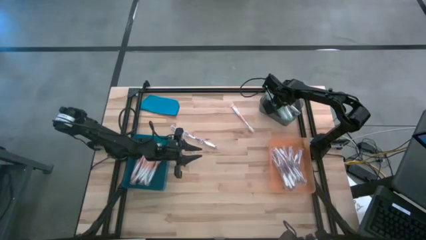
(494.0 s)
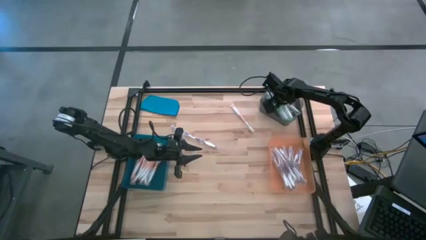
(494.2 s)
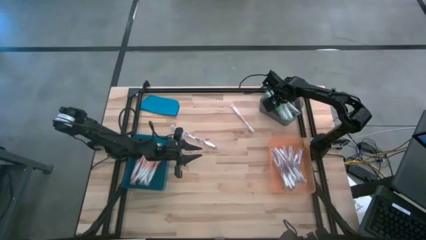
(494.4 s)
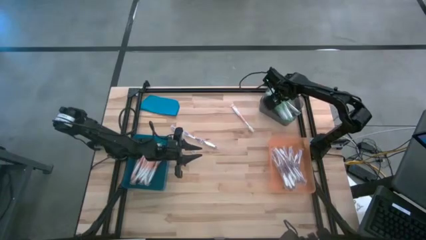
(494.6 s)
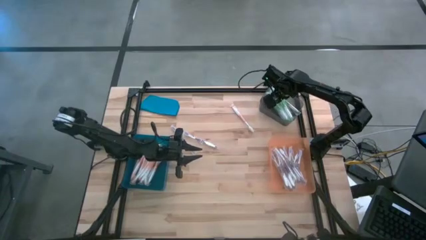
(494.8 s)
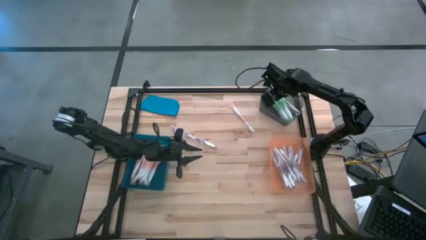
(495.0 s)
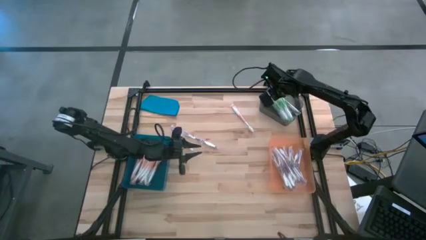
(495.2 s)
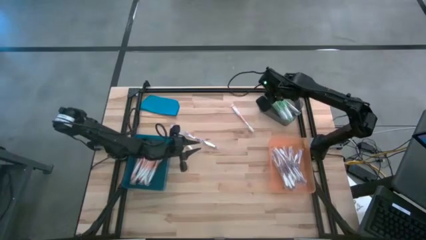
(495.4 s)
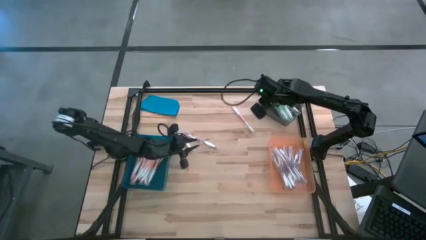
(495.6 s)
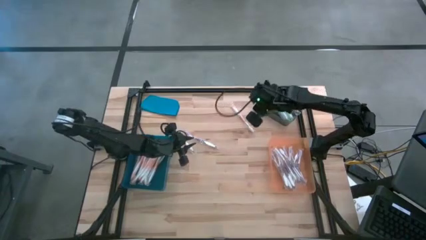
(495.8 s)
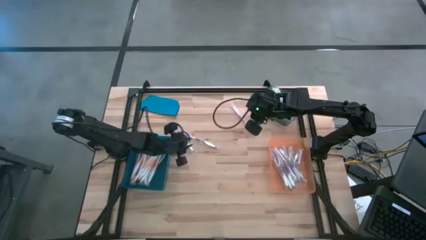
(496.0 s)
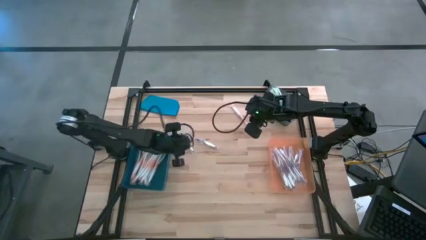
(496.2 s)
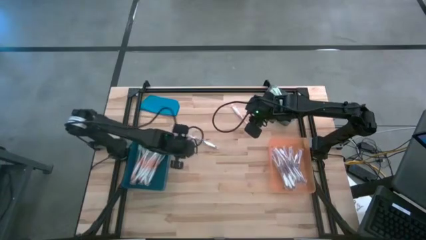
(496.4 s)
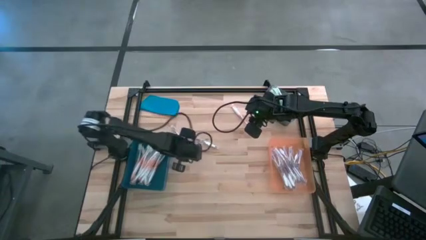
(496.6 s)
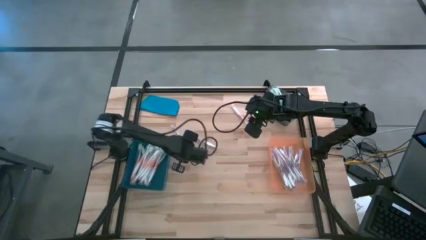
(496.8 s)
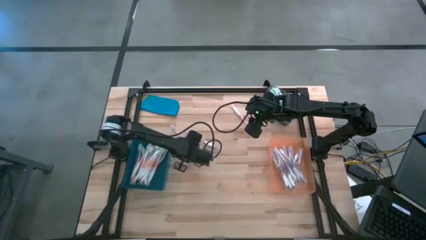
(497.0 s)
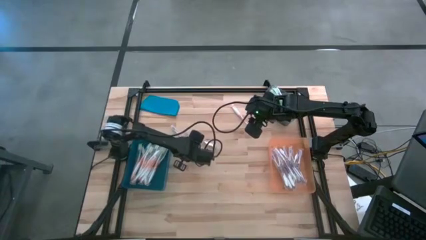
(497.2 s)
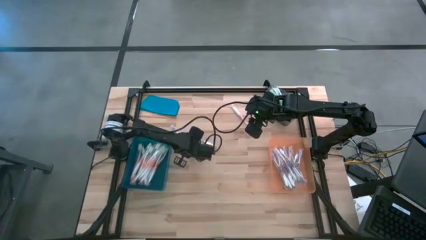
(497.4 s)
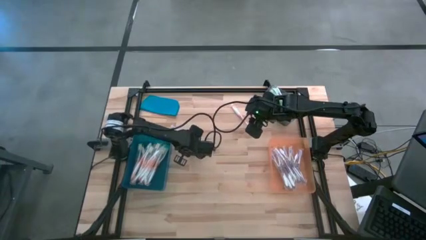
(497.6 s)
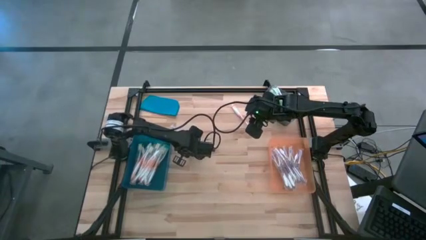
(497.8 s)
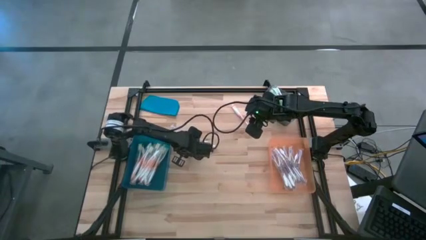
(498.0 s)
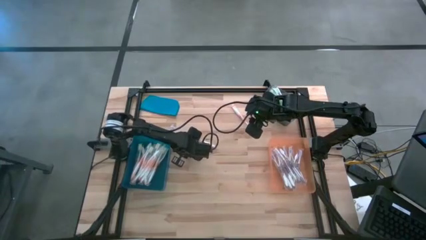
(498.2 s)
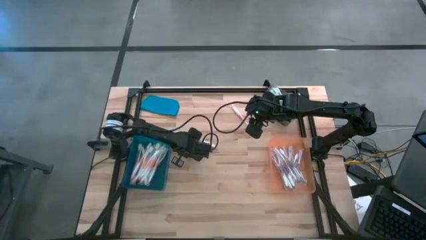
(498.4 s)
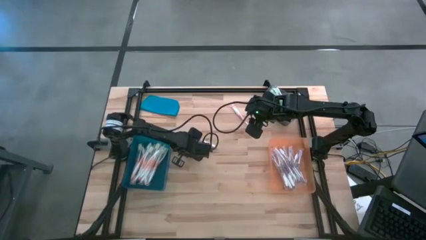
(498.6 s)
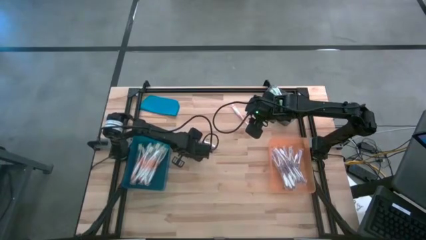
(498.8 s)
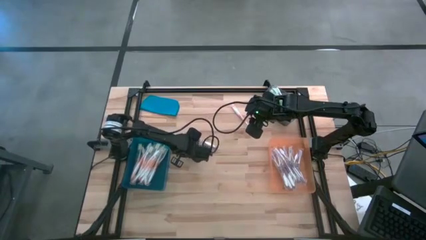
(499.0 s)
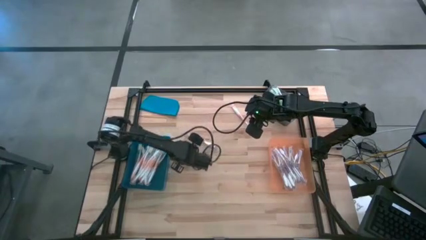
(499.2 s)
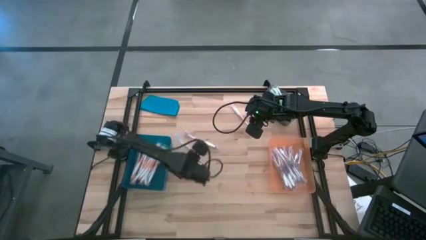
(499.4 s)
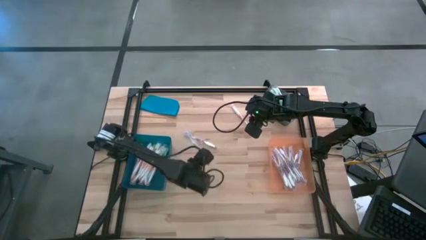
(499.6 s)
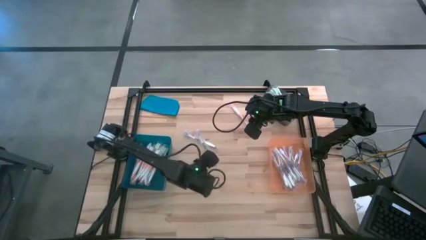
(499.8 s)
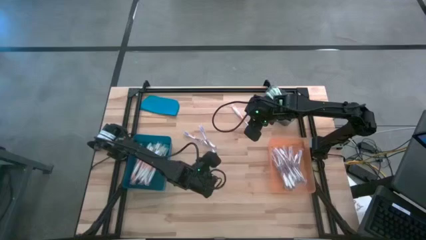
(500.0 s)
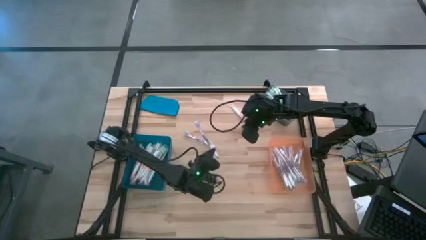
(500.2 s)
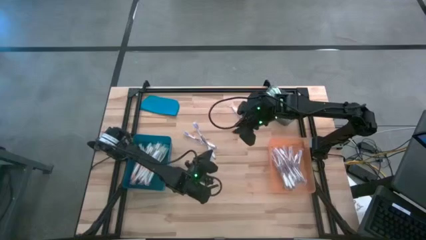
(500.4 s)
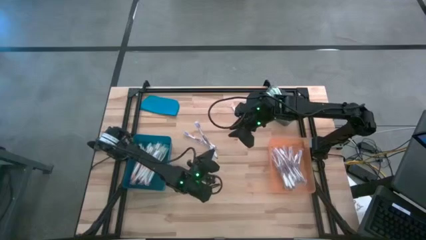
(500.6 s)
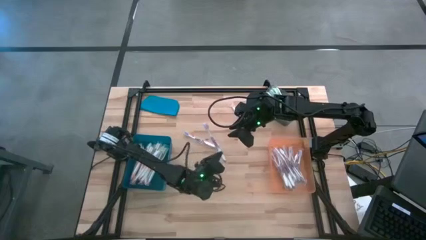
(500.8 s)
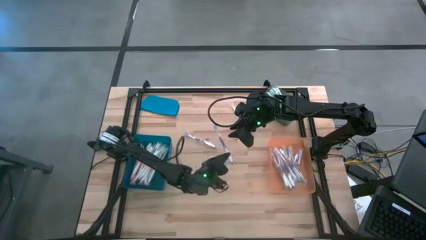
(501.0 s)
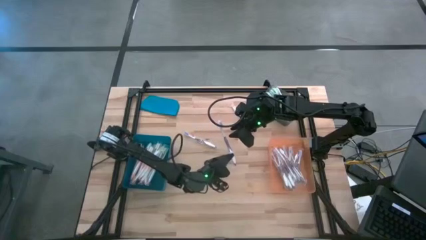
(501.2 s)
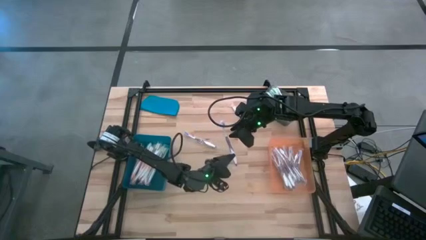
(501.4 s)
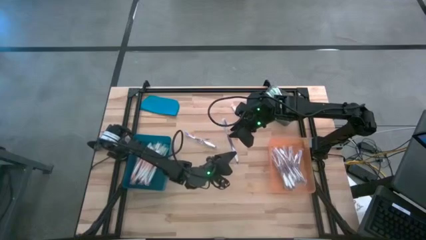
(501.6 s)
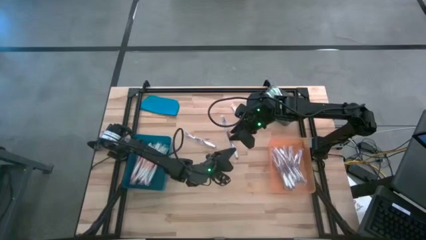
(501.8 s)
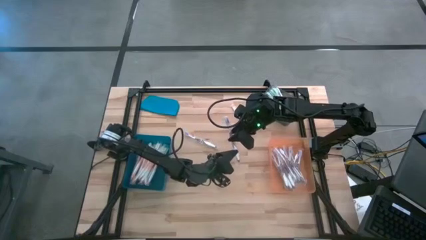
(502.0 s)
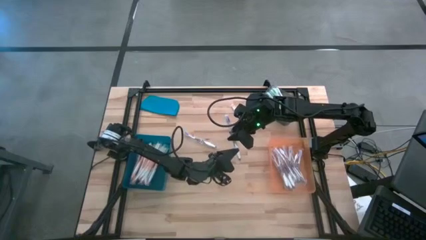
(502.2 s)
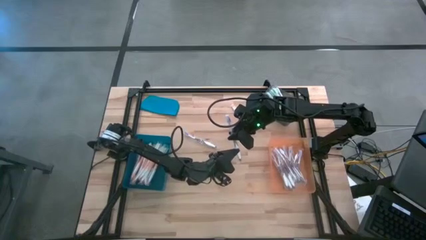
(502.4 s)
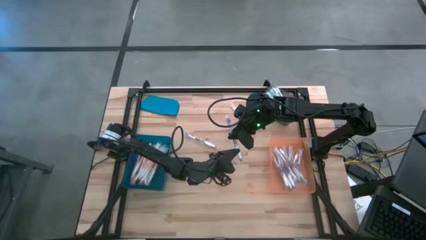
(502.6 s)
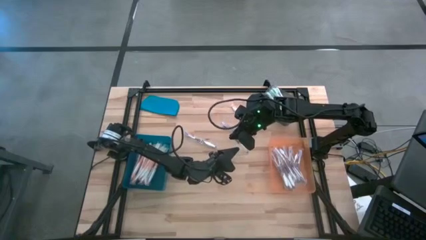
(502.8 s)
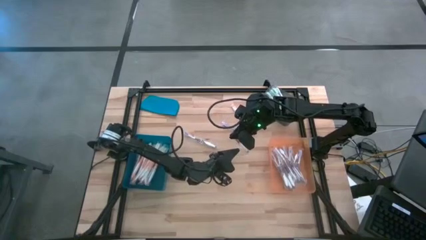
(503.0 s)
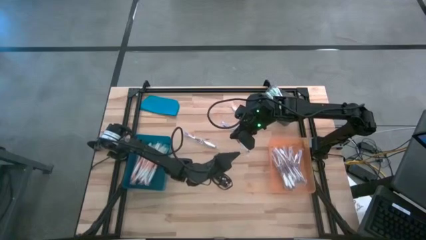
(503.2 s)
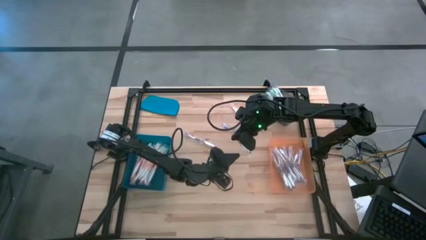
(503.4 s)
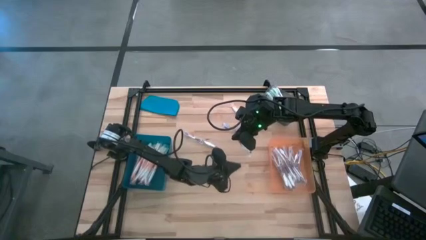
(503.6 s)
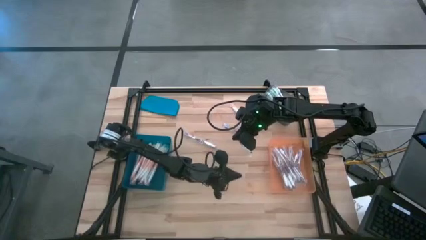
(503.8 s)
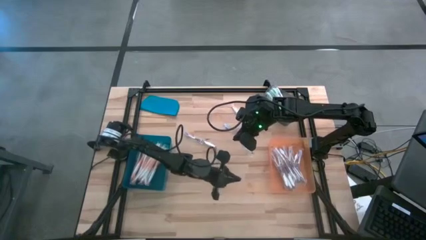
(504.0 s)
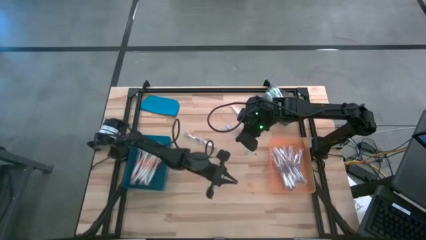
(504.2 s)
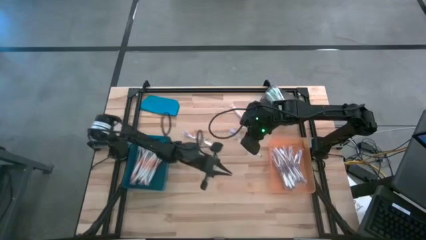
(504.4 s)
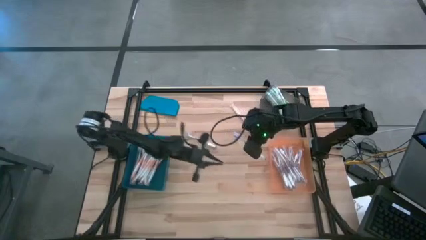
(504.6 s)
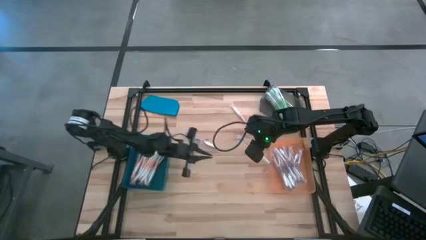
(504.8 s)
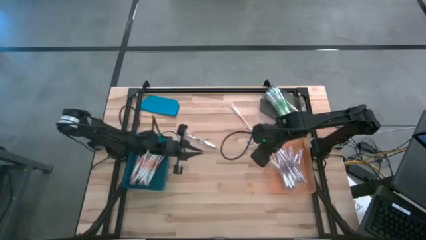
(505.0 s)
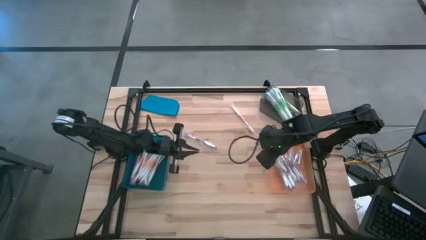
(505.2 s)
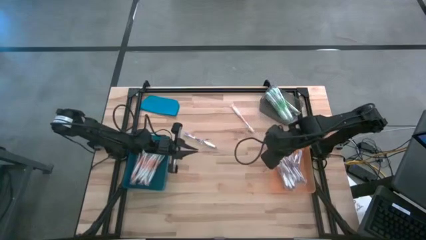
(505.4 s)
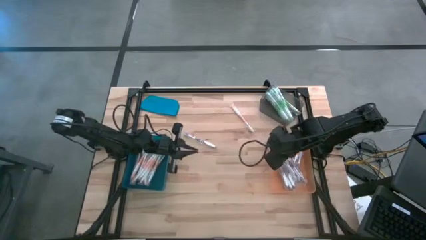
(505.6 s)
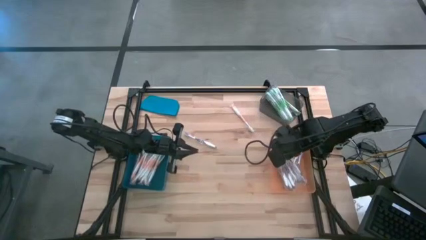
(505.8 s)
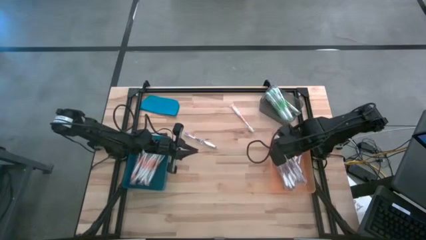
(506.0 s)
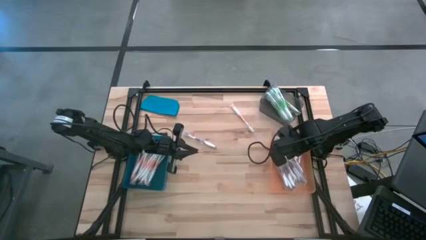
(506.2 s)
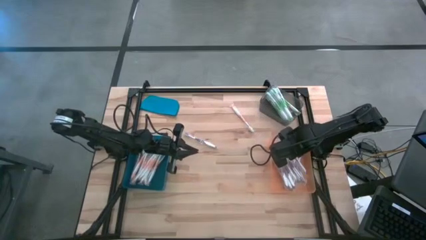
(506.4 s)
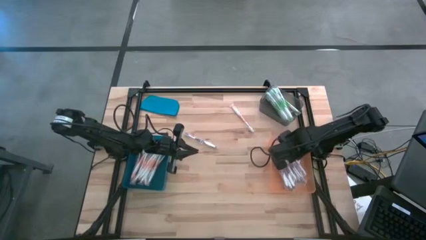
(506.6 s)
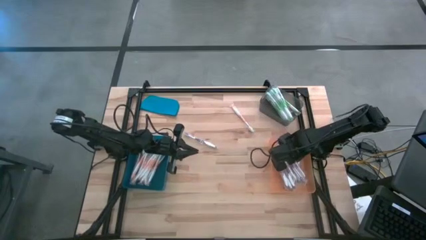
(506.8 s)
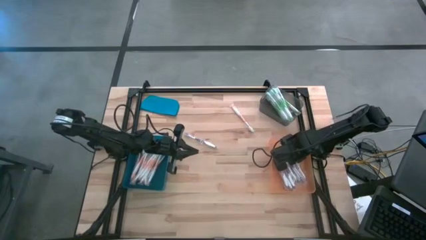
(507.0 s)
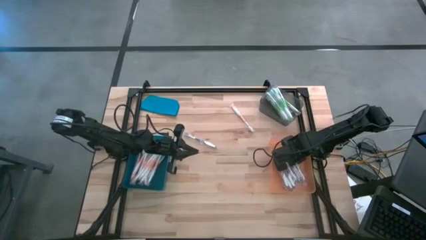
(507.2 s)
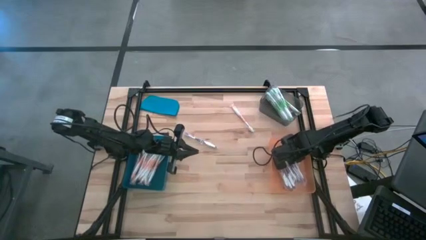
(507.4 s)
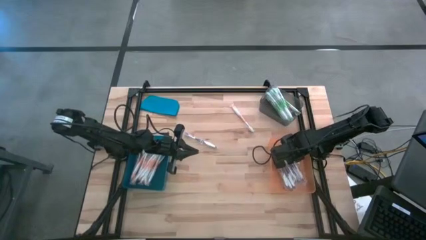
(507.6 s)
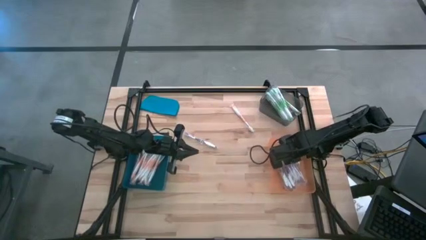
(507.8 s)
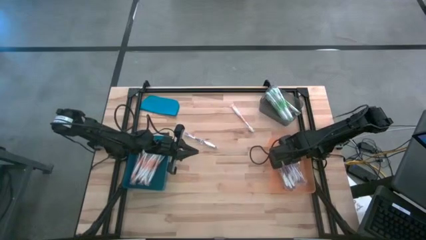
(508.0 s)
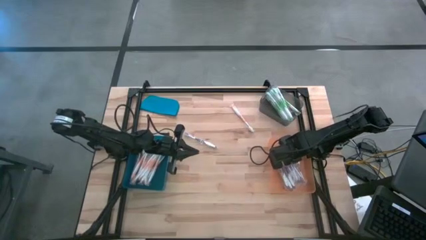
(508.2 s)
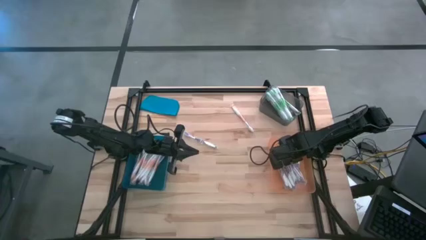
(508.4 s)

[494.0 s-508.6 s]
Task: Pick & Place Toothbrushes
Put the purple toothbrush into the orange bin
